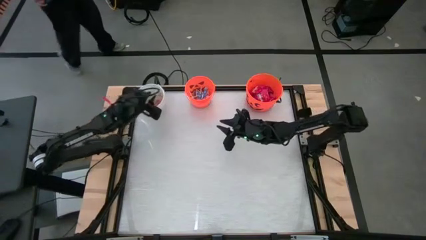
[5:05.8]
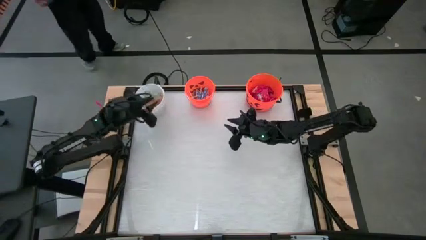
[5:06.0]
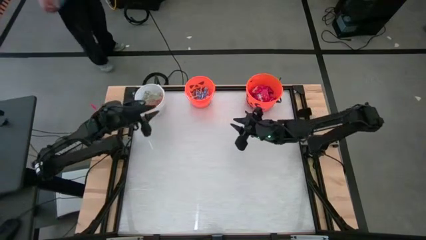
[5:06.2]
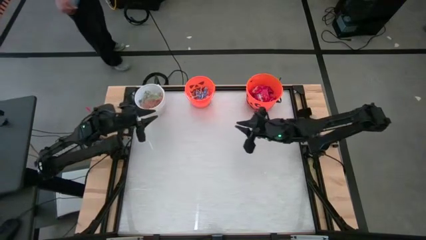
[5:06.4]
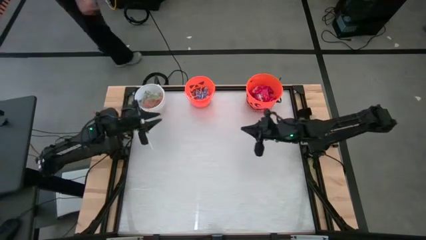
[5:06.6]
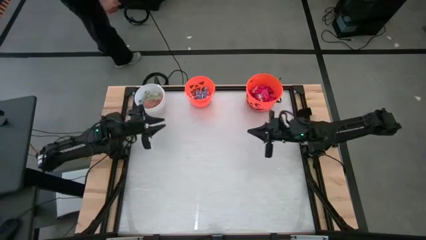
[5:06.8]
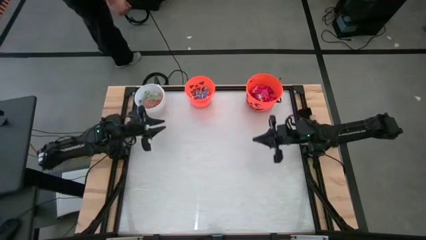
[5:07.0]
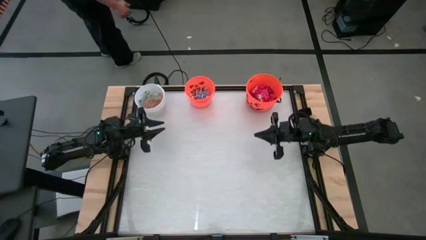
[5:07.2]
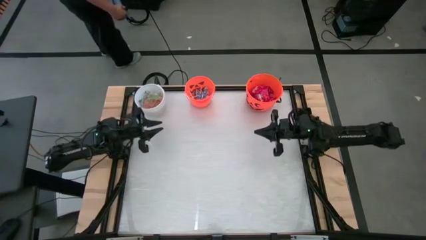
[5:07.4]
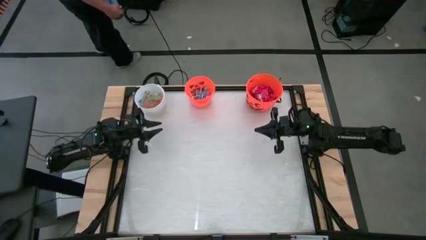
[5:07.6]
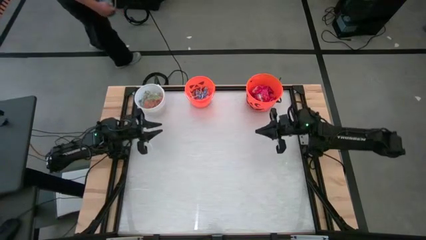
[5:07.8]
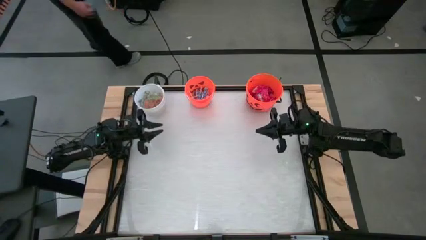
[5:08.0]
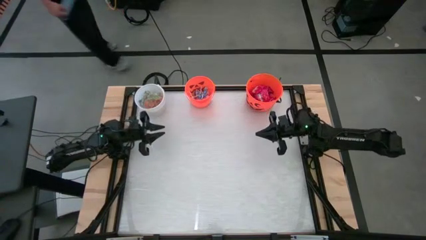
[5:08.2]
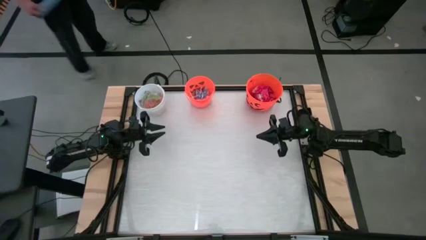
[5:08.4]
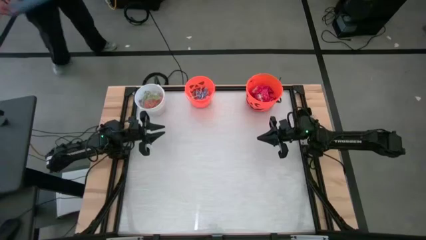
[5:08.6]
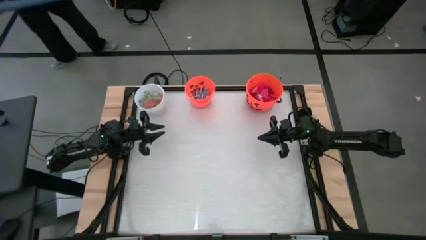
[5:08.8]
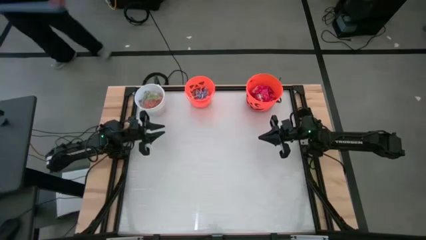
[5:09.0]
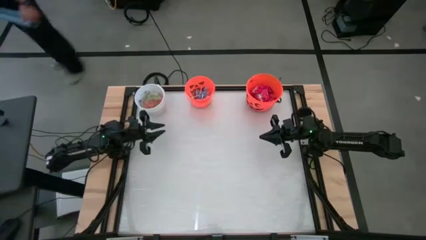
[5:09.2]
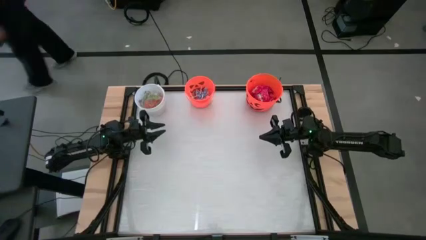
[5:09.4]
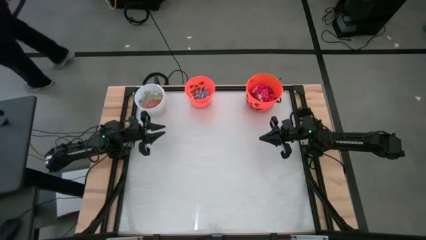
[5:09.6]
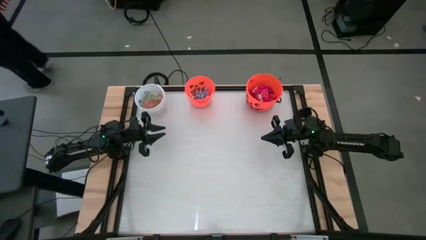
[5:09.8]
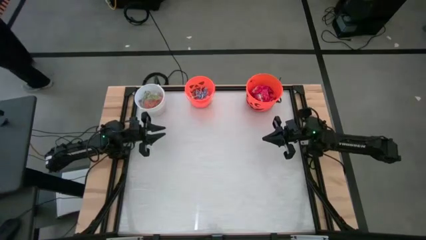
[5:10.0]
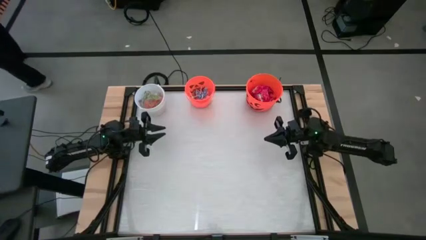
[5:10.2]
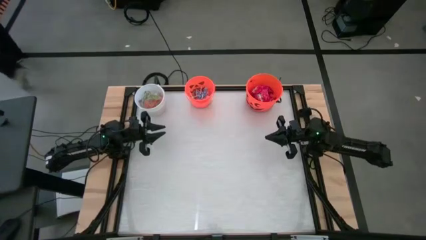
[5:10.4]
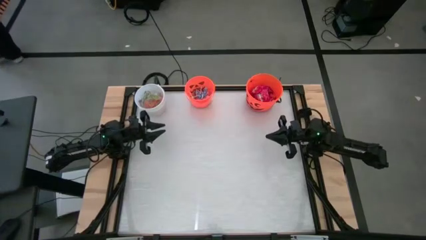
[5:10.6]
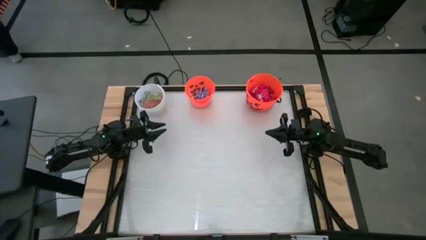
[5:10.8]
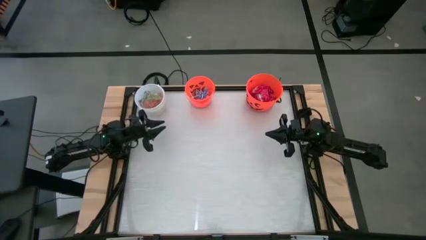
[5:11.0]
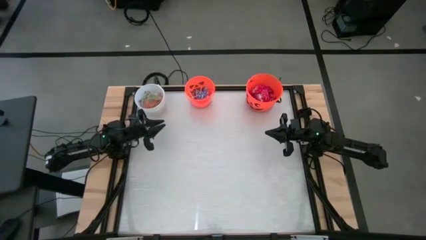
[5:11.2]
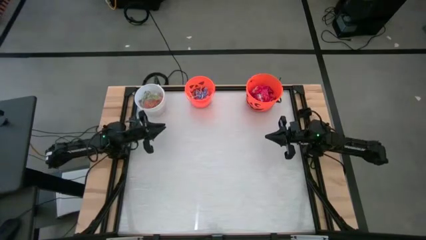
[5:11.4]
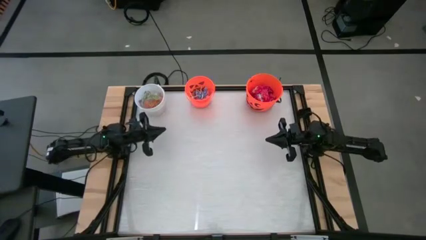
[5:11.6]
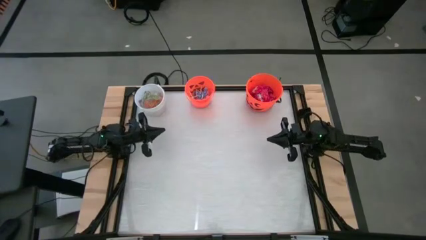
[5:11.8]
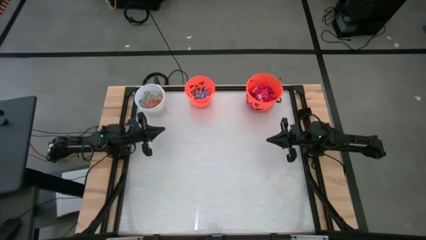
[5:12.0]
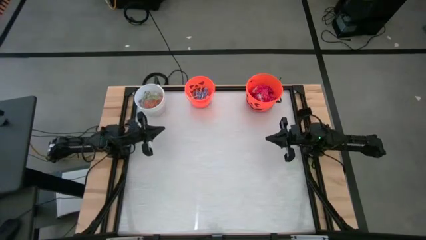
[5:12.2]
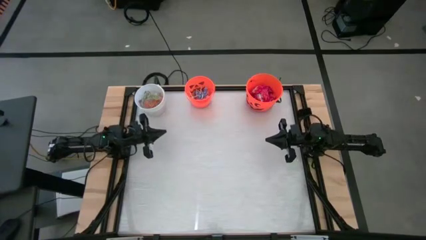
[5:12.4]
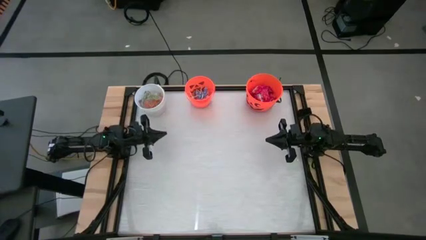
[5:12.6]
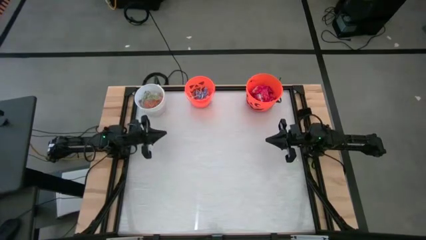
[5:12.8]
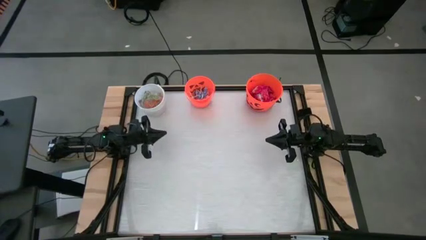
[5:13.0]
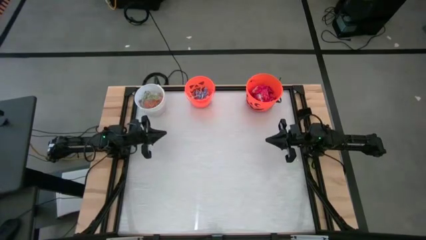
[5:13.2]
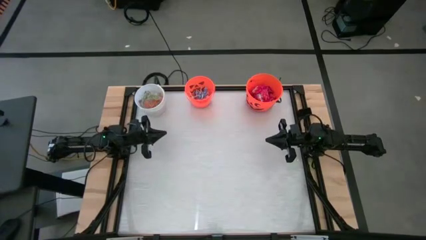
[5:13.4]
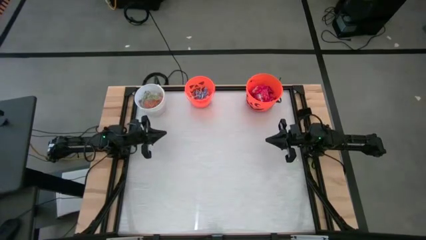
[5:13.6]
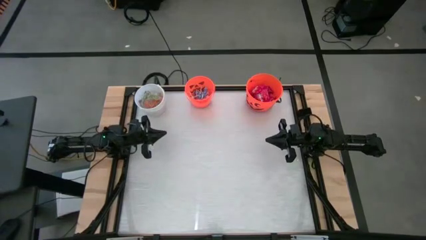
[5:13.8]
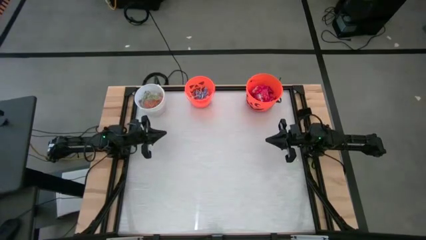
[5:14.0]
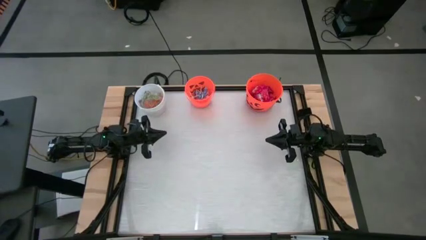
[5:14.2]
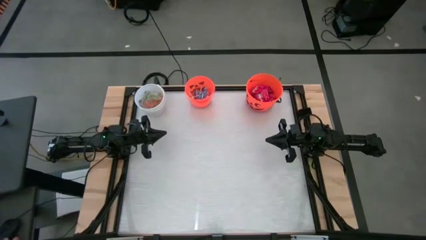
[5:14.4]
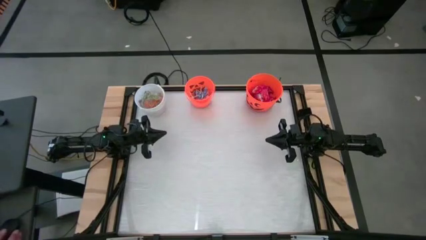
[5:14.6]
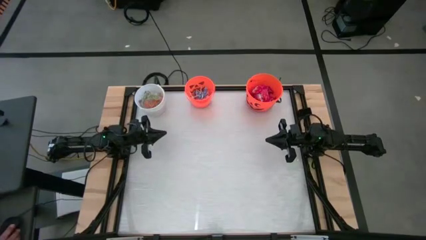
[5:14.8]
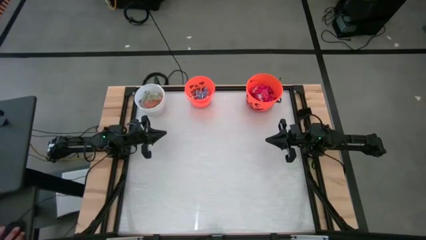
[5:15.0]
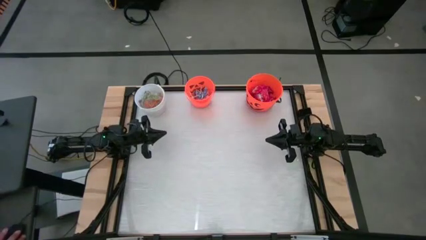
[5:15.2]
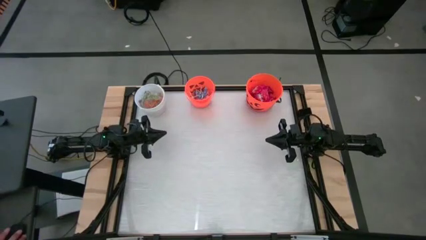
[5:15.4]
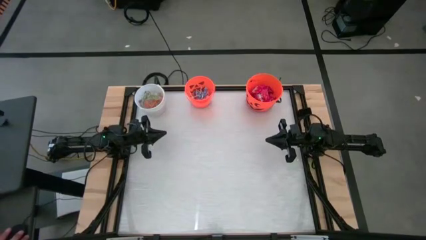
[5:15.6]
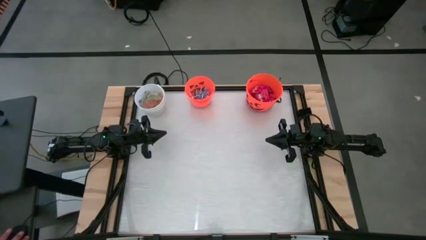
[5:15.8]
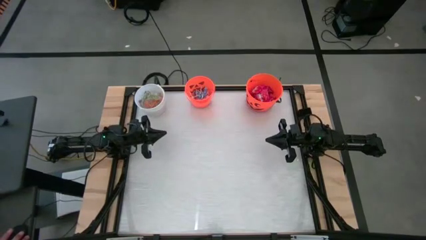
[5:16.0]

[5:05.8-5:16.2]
Task: Sort candy by brand, put in halloween buckets
Return to Home Position
